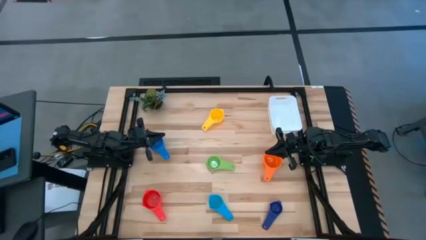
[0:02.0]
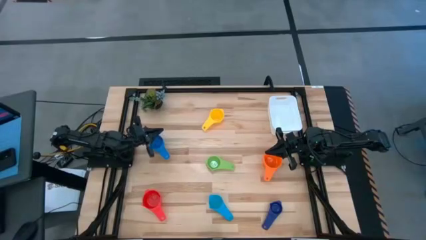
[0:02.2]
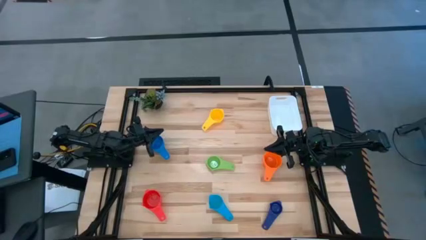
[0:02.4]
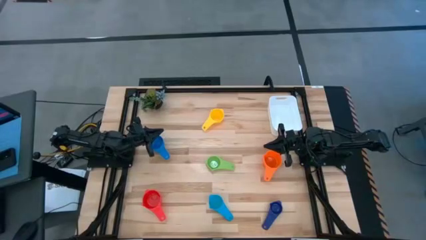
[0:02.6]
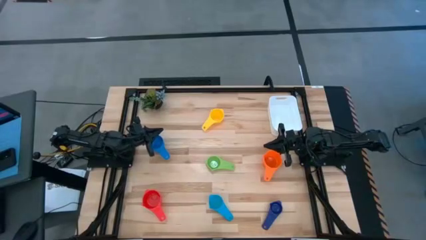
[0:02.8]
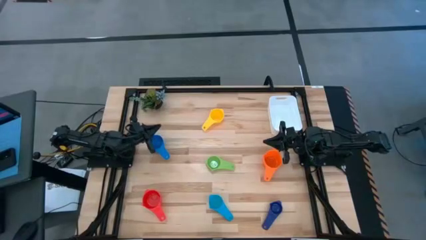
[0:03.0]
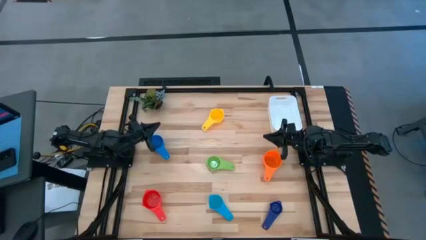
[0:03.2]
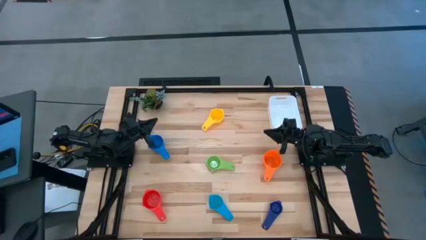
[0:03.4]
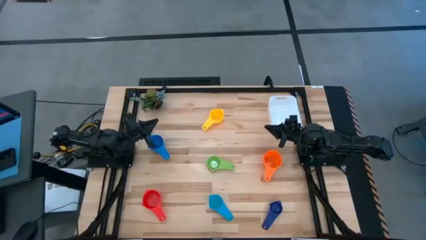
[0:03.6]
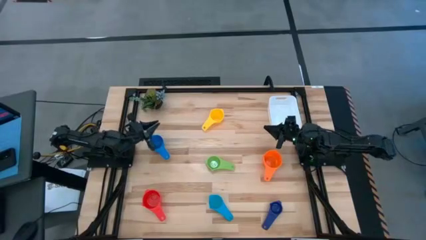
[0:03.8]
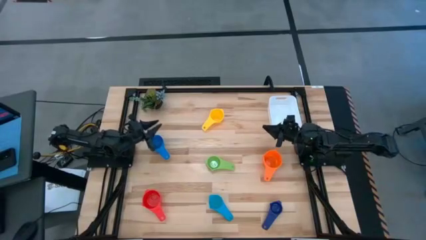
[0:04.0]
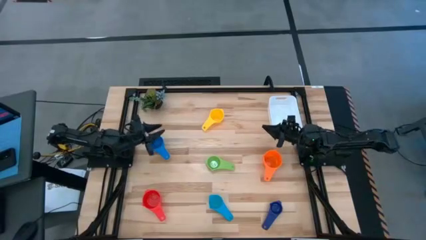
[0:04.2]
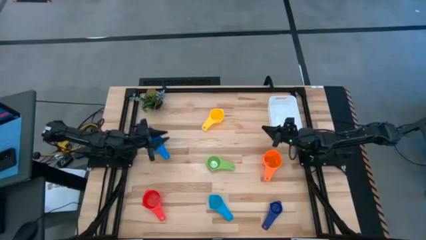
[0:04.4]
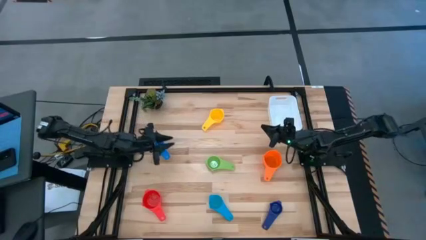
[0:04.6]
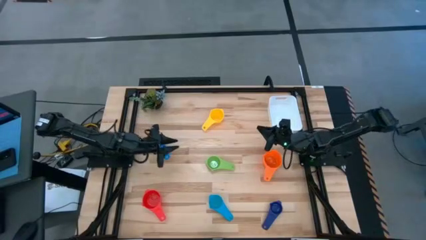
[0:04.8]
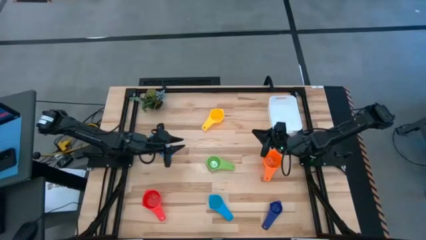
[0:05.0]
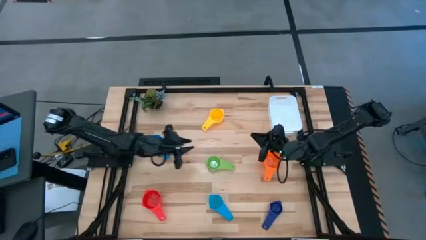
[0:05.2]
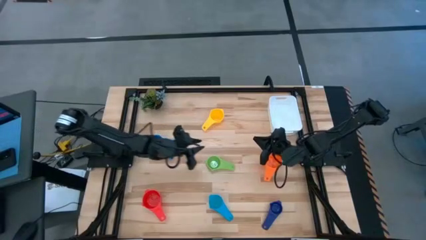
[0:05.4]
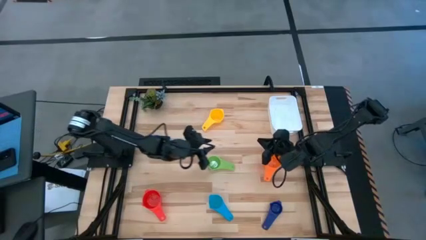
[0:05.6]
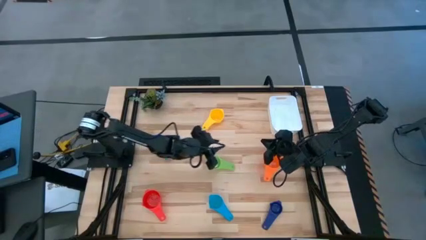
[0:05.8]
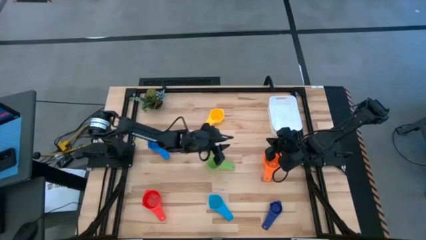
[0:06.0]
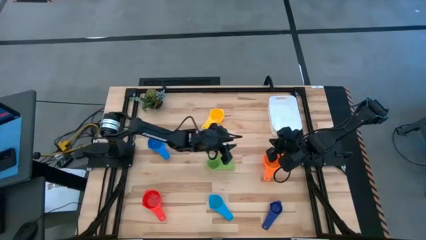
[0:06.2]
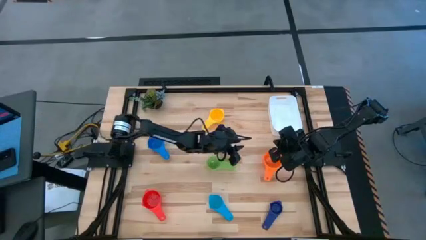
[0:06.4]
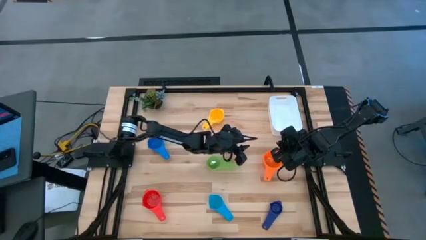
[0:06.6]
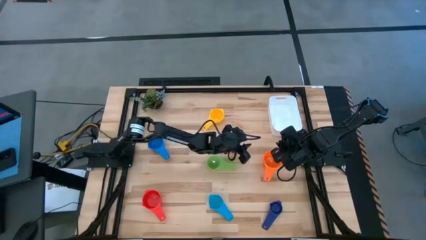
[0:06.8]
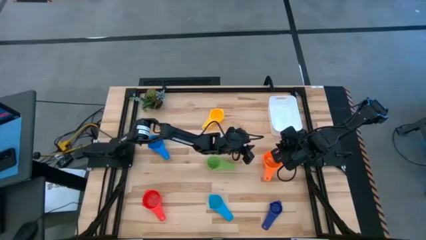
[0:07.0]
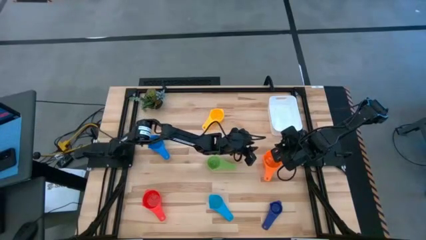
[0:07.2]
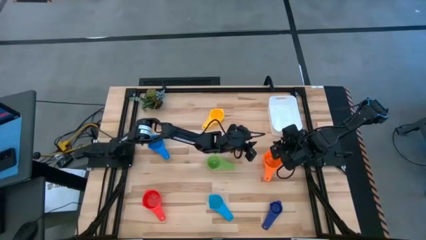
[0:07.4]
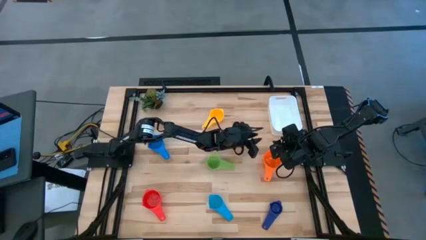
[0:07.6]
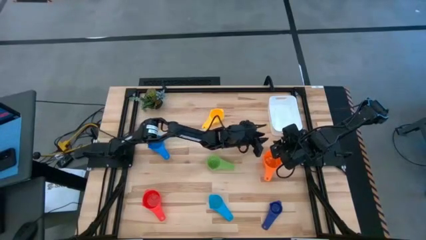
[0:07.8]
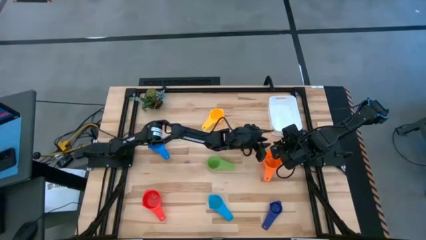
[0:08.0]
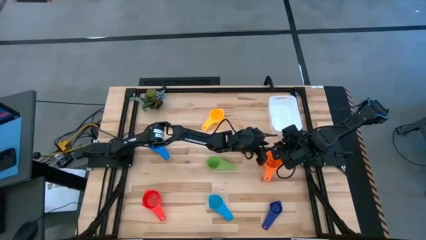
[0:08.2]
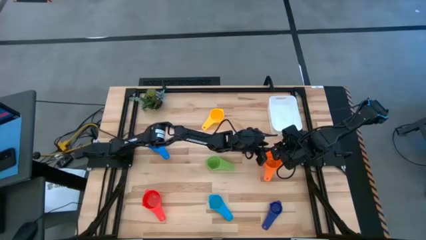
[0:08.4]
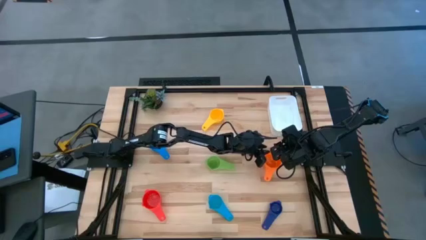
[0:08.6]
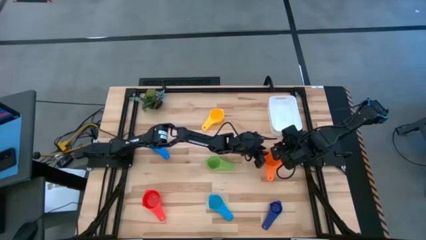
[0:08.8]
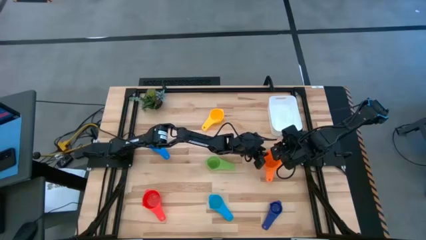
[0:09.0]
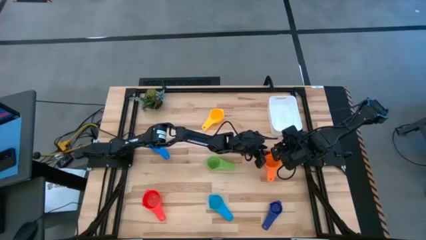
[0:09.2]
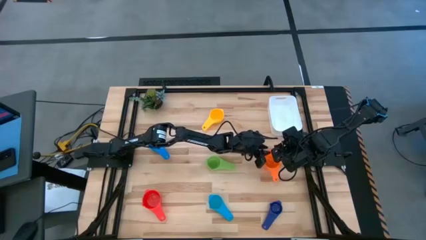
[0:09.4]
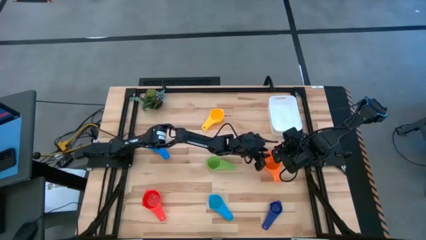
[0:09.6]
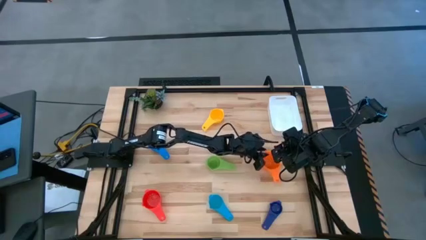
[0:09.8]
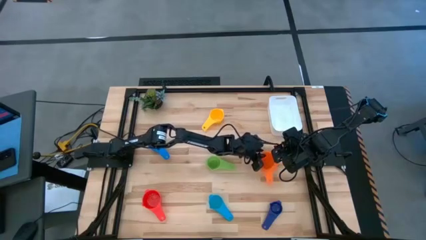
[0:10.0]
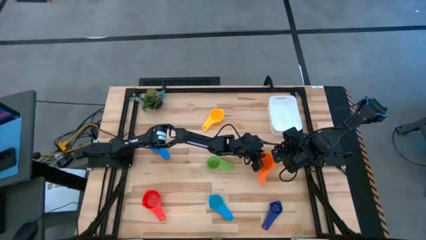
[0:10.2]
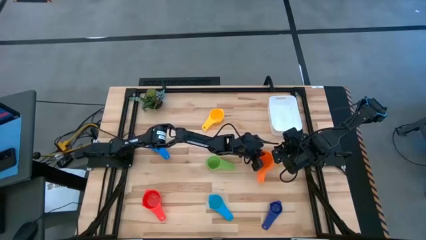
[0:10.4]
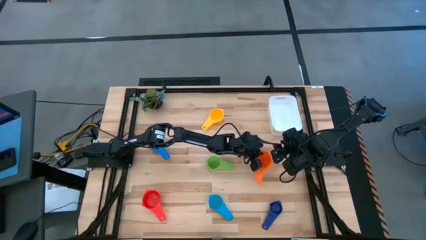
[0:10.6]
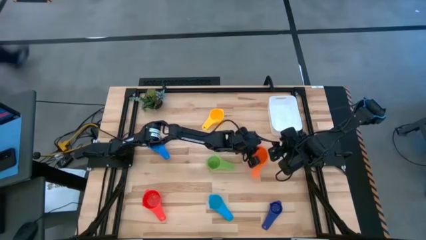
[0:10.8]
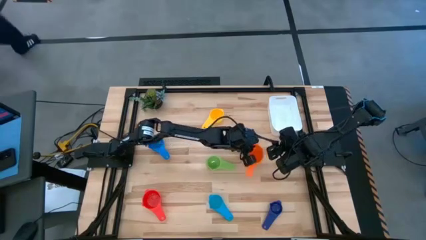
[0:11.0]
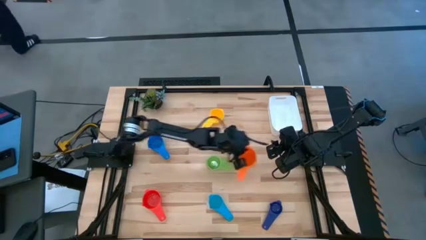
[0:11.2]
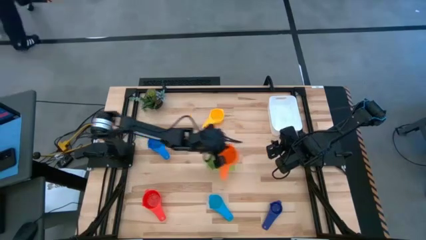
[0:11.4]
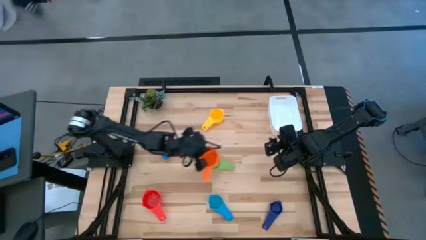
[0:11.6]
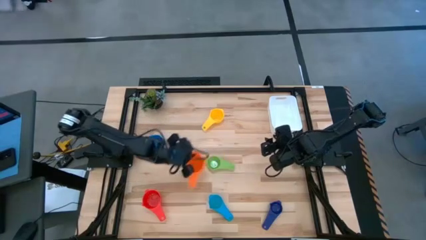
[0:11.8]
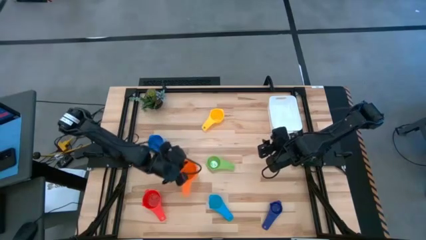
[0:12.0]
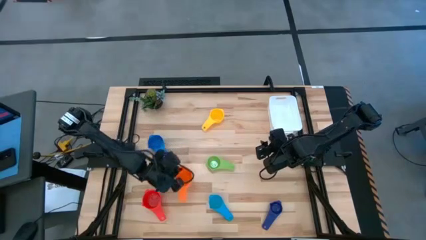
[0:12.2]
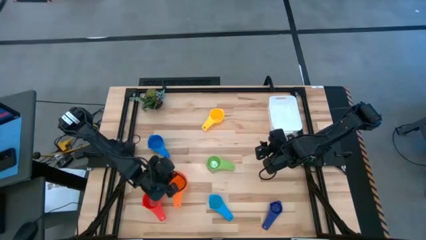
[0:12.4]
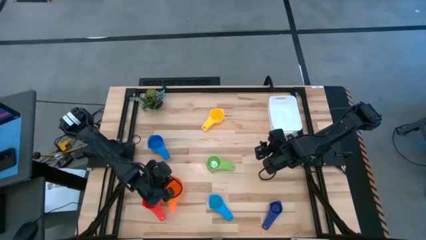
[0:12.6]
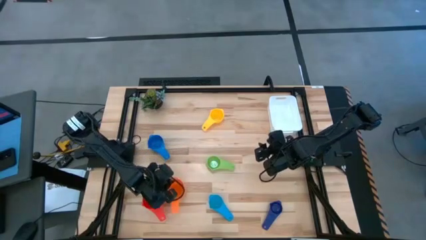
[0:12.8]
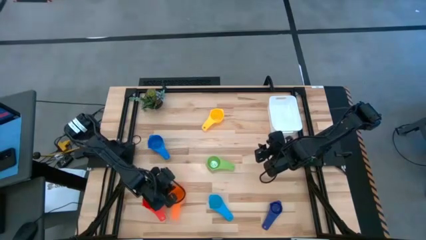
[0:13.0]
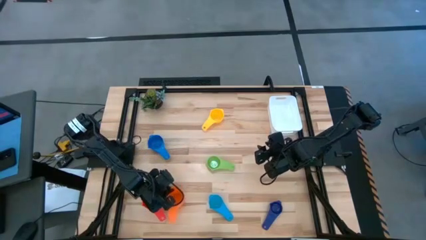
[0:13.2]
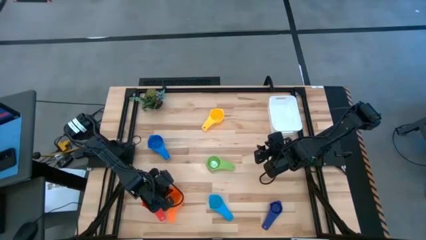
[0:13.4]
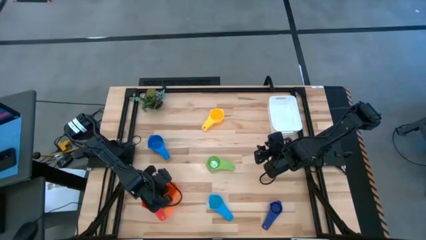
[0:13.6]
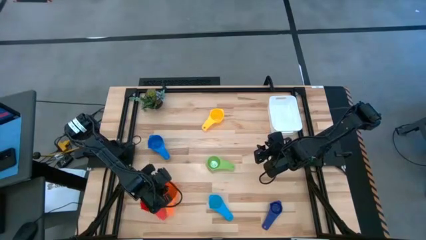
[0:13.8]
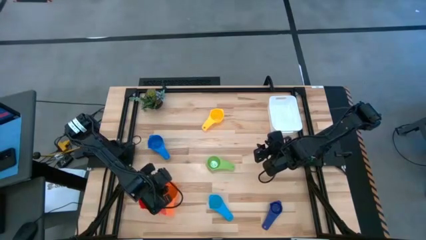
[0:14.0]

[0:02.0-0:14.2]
Task: Nest measuring cups in basket
Move the orange measuring cup to the bottom left of the table

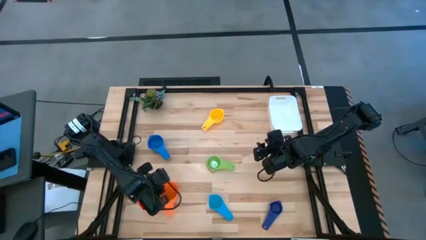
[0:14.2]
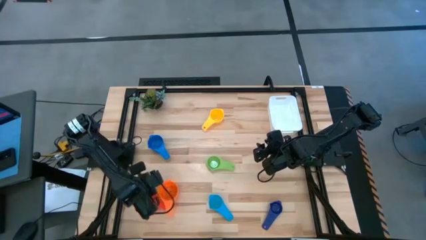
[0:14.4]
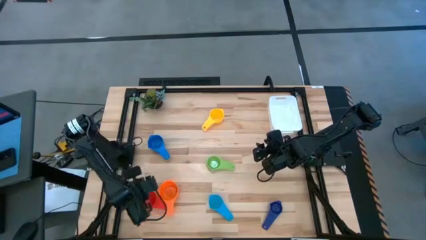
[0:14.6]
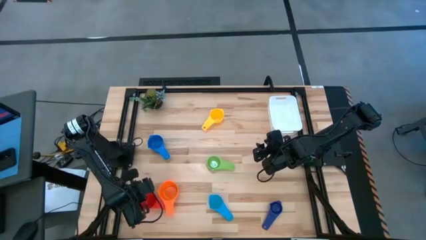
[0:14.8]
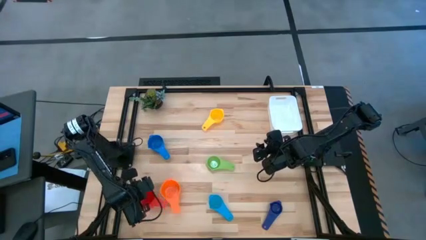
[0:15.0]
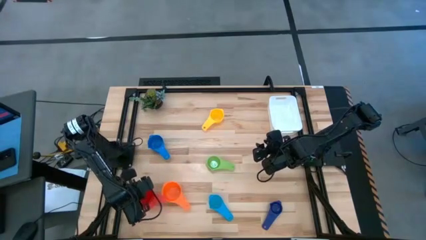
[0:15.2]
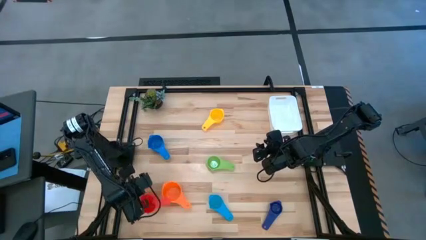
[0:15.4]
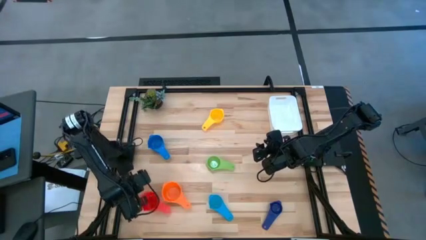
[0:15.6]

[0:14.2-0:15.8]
Stack the red measuring cup on top of the orange measuring cup

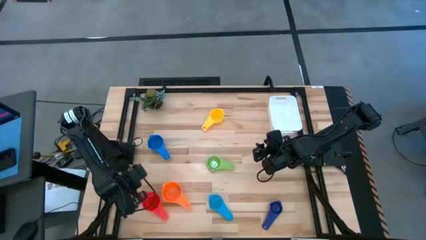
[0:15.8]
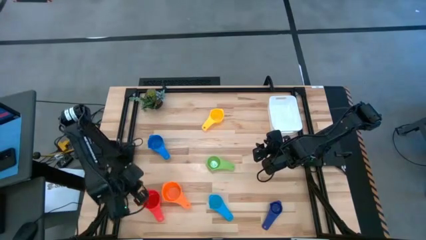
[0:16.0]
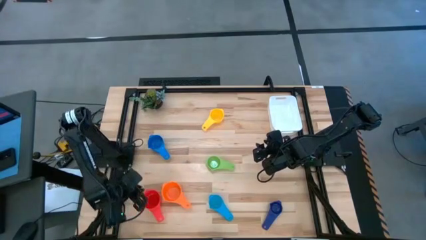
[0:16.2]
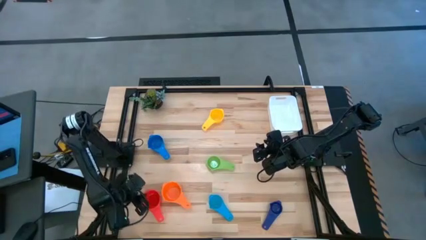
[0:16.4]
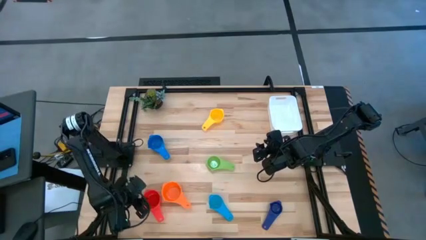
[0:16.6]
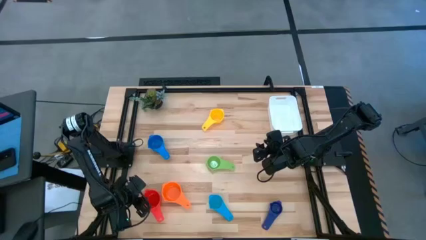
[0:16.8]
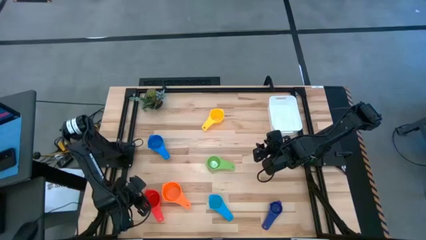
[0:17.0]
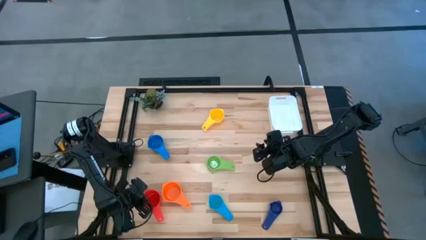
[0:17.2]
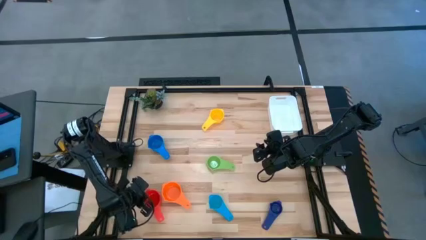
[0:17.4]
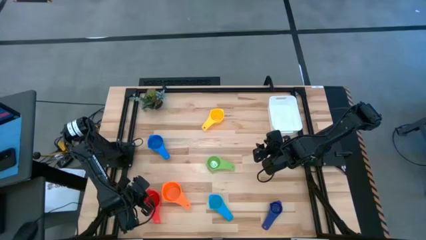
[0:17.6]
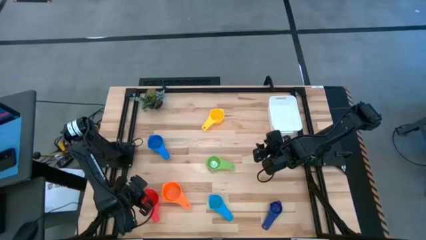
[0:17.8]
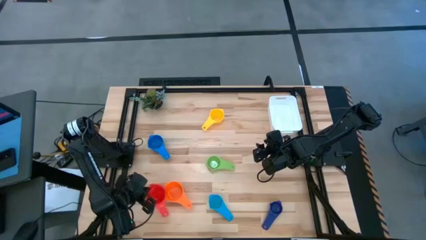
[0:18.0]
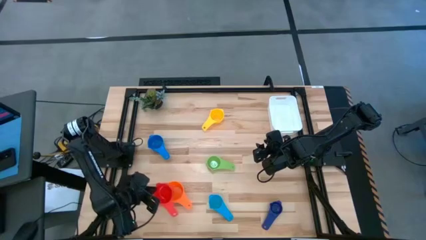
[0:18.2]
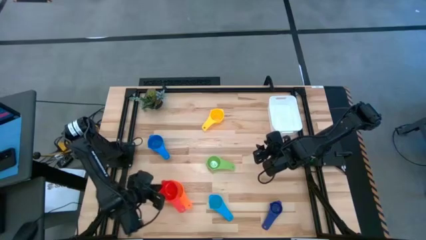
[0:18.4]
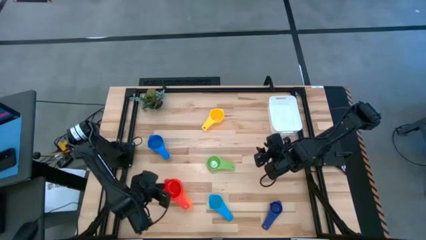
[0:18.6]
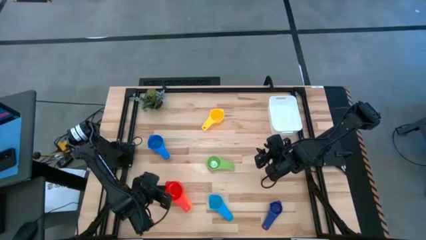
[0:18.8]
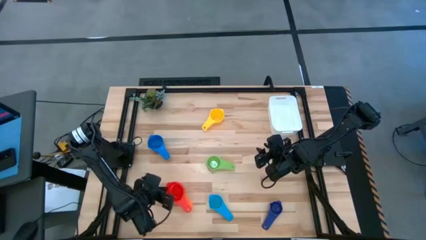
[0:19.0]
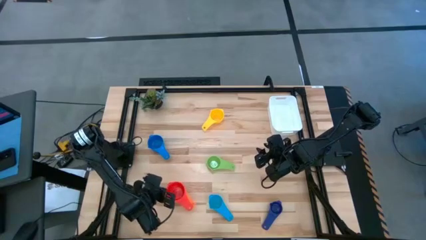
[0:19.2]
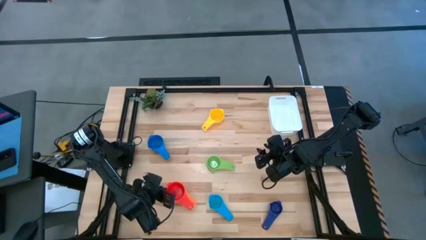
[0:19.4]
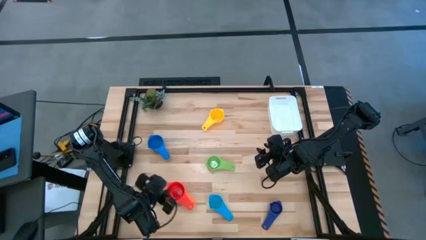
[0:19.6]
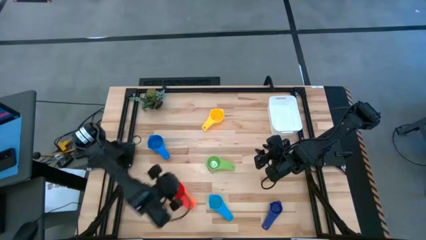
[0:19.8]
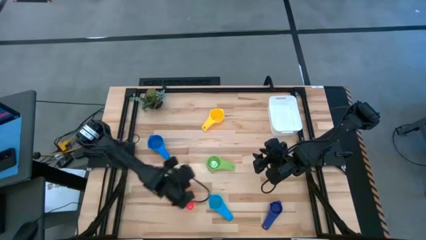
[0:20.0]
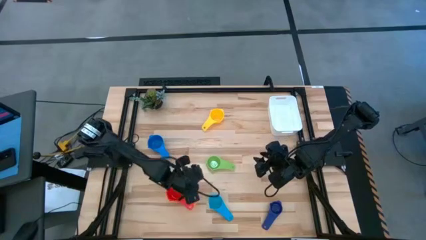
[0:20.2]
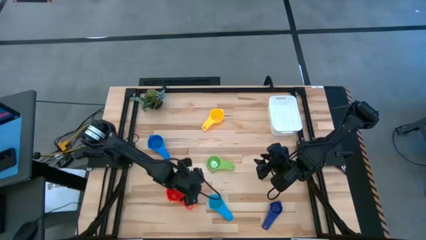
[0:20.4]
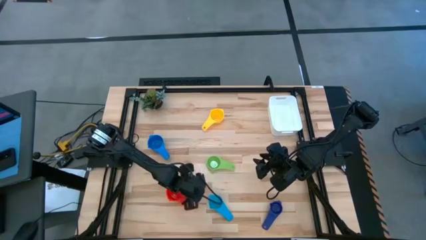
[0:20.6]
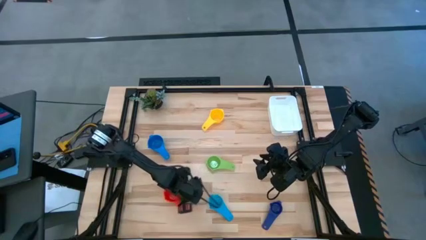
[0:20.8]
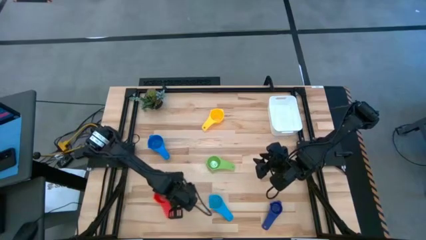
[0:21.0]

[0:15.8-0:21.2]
Stack the red measuring cup on top of the orange measuring cup
